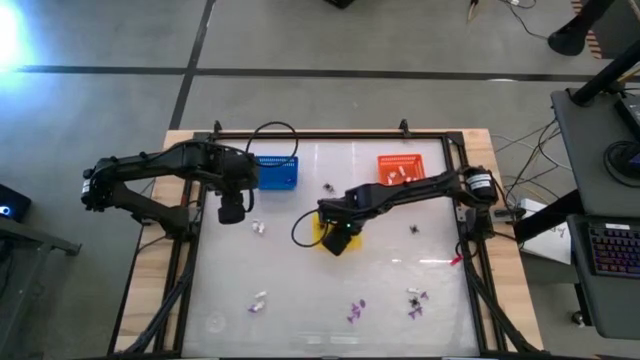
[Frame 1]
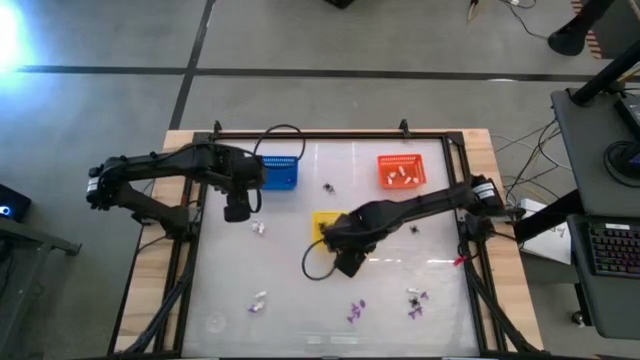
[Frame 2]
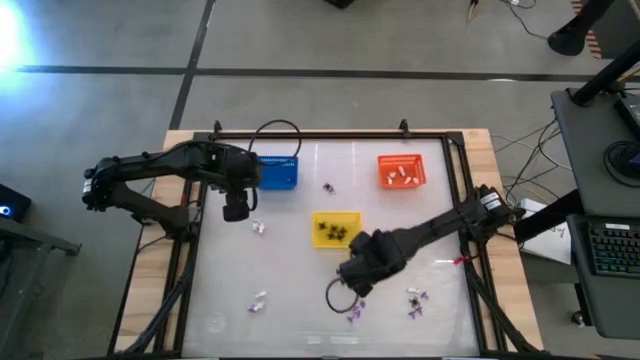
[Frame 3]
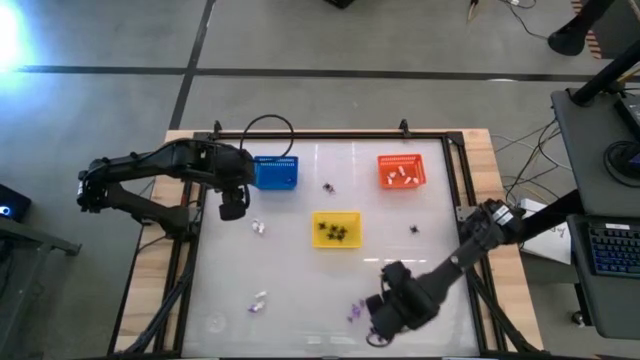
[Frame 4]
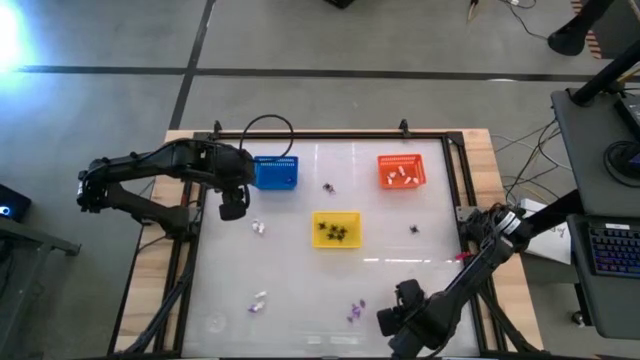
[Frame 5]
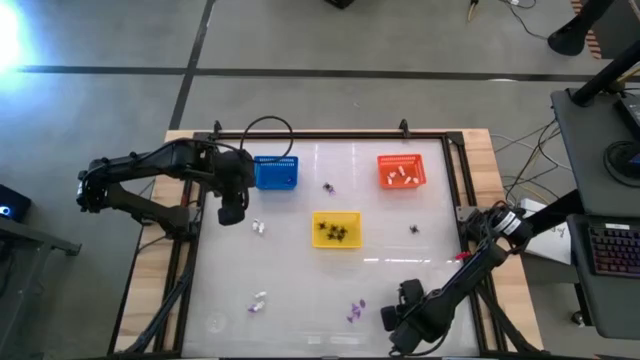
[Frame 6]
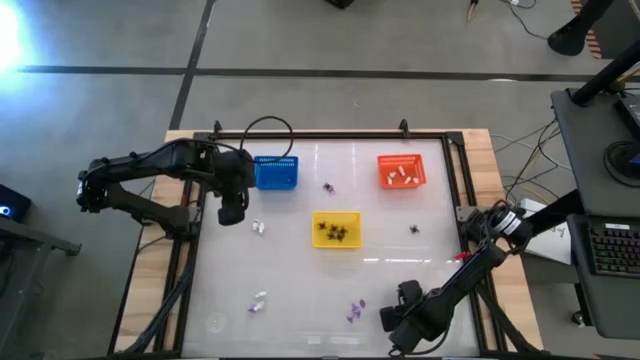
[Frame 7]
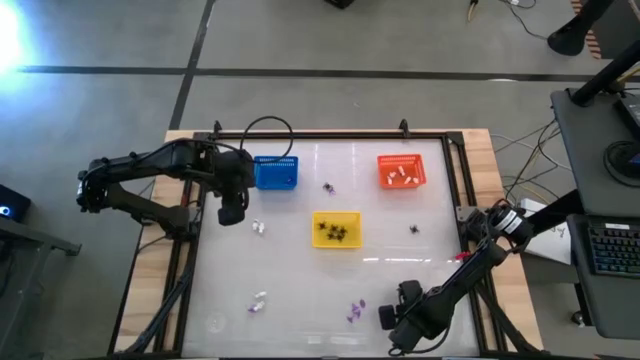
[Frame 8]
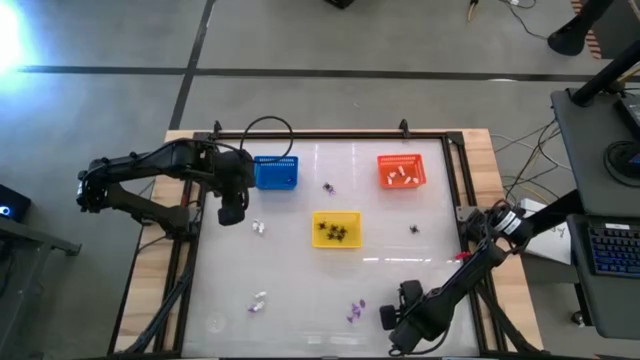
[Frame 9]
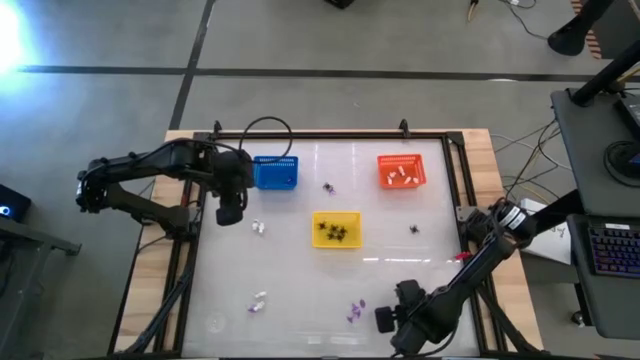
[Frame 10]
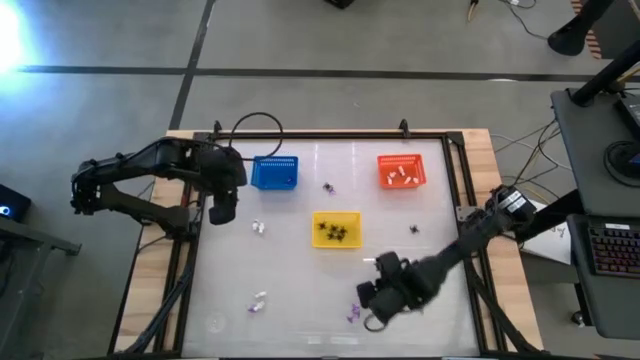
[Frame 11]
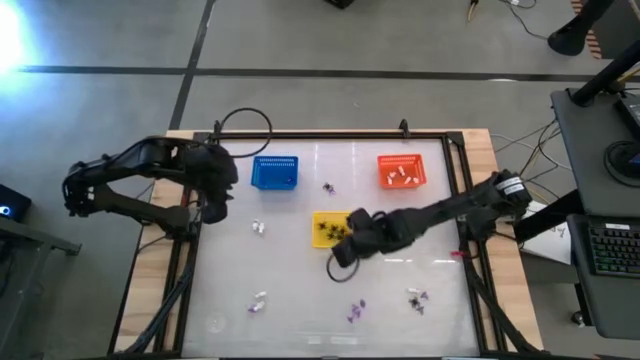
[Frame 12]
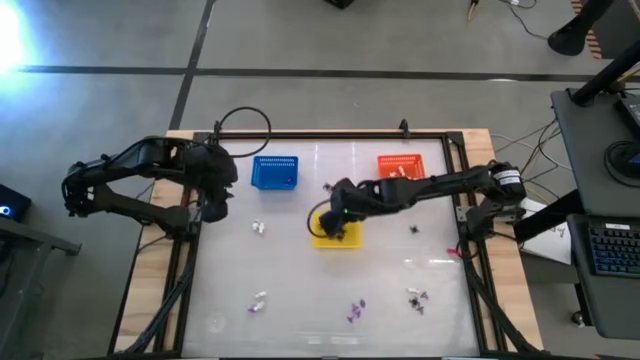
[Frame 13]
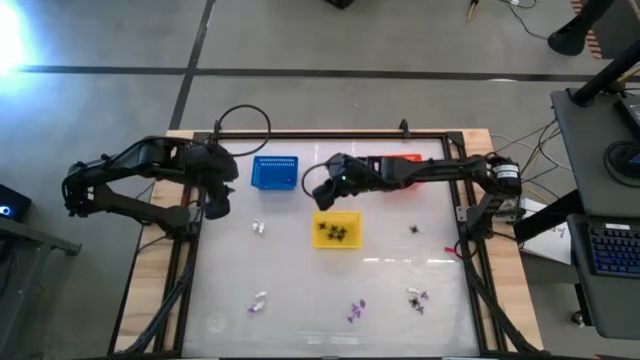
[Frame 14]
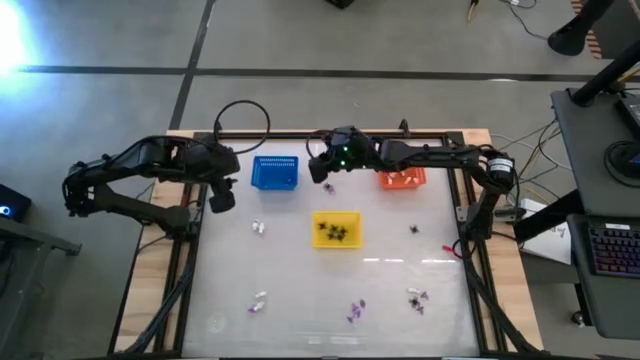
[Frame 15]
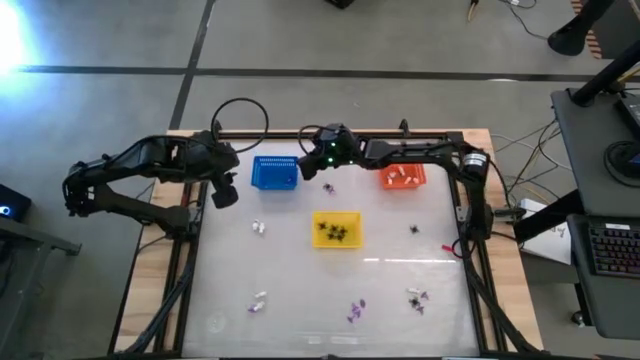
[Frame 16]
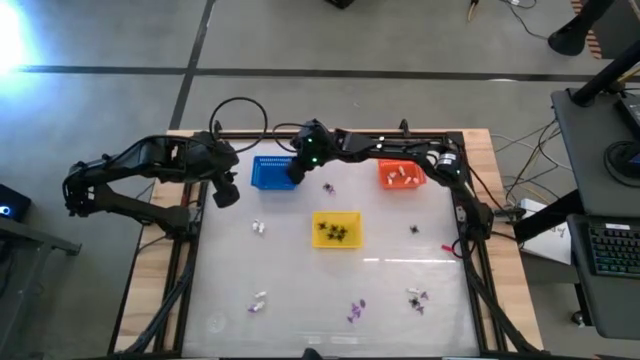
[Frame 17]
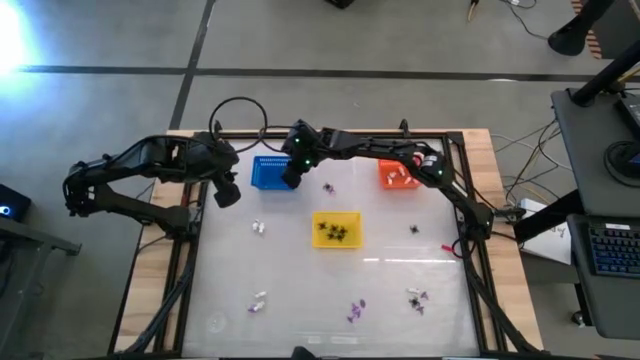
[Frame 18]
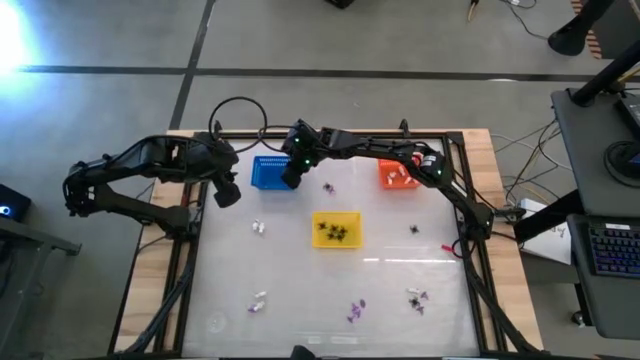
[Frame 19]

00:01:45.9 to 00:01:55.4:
Task: Sort Halloween decoration
Put the purple witch hat toy into the blue bin

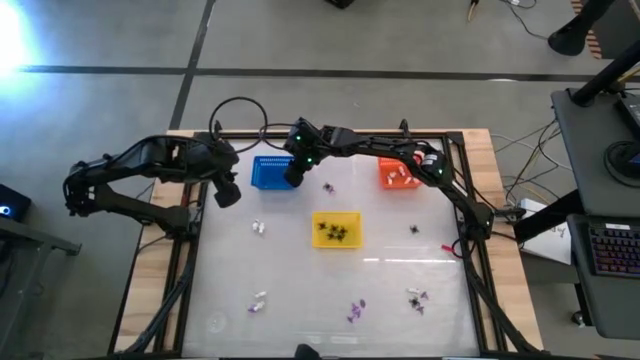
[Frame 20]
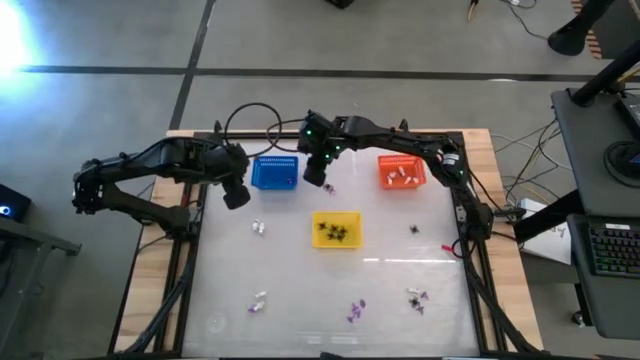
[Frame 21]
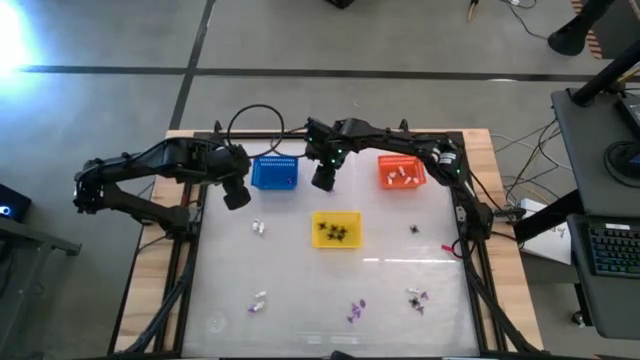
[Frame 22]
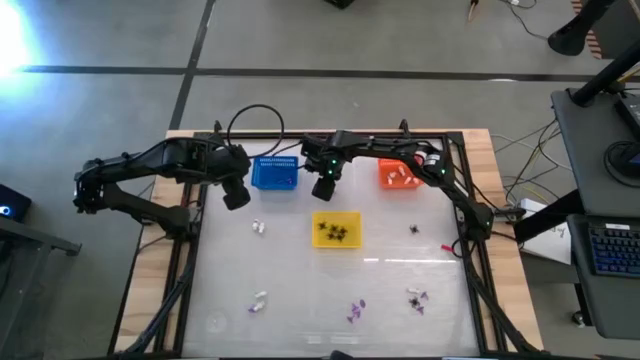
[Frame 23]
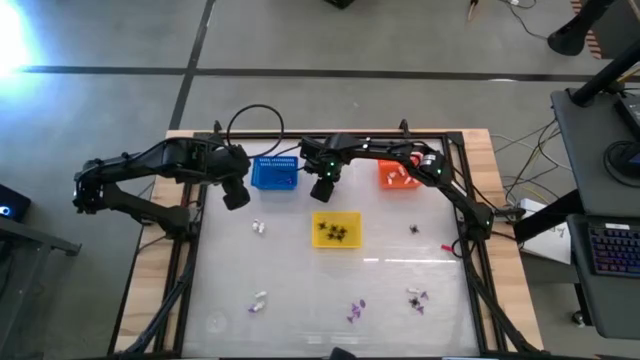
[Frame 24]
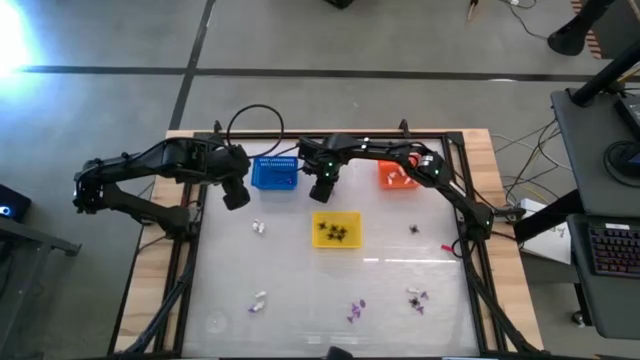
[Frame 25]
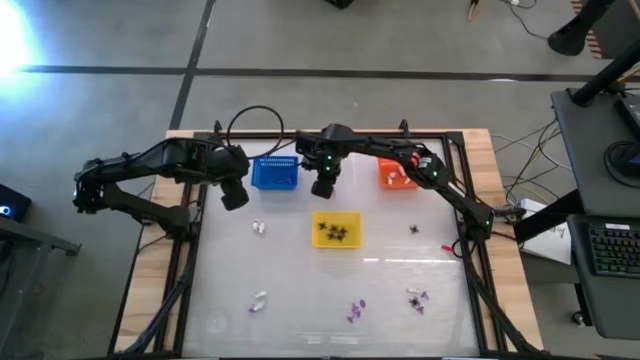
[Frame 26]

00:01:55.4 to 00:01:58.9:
Put the black spider toy into the yellow bin

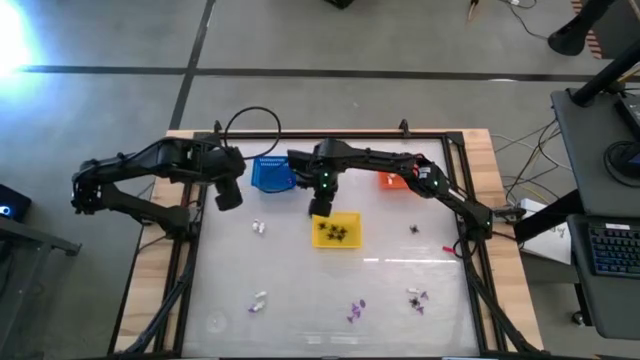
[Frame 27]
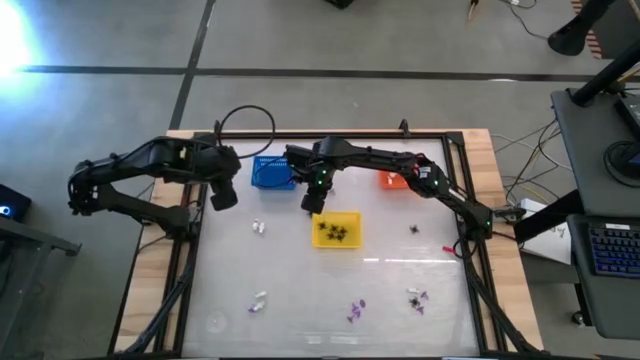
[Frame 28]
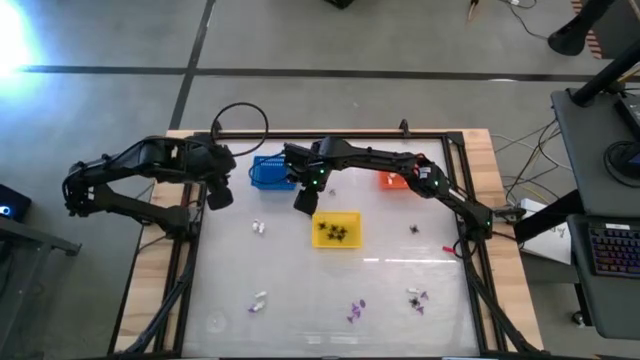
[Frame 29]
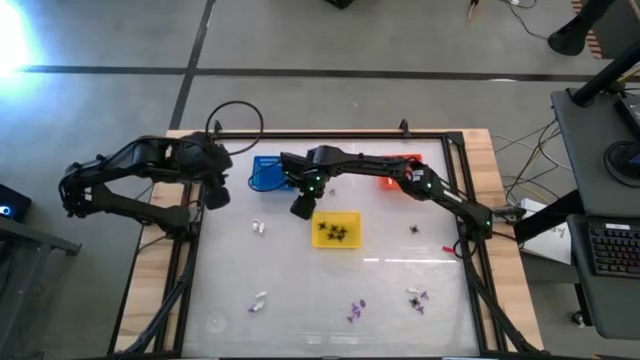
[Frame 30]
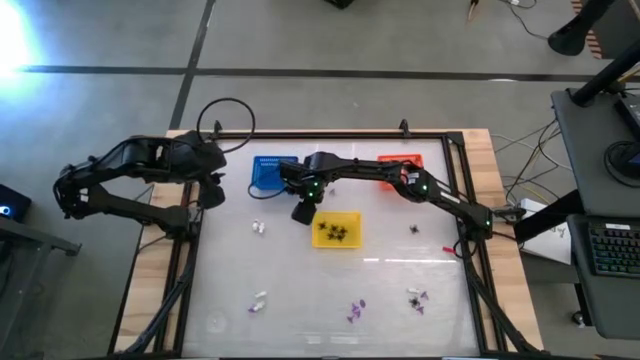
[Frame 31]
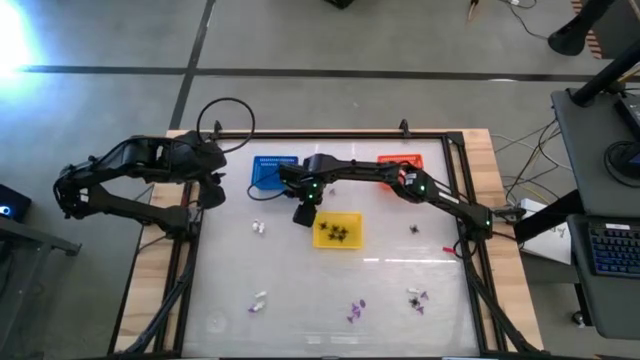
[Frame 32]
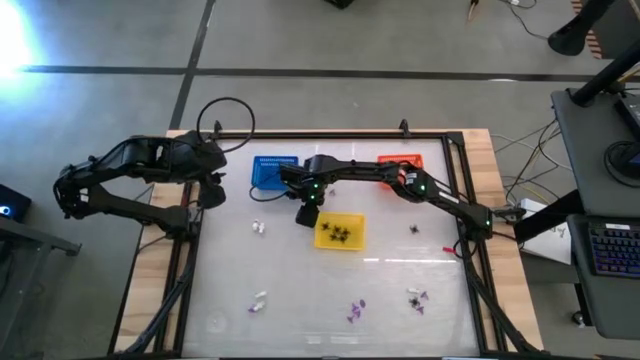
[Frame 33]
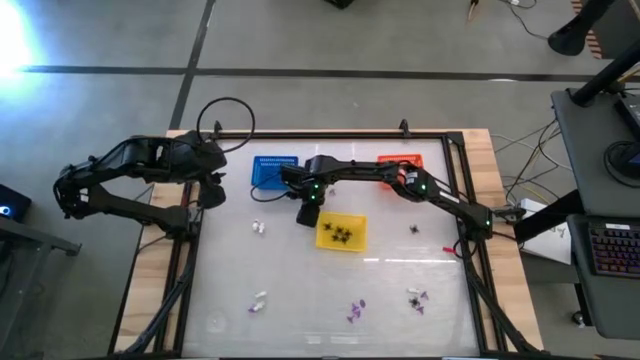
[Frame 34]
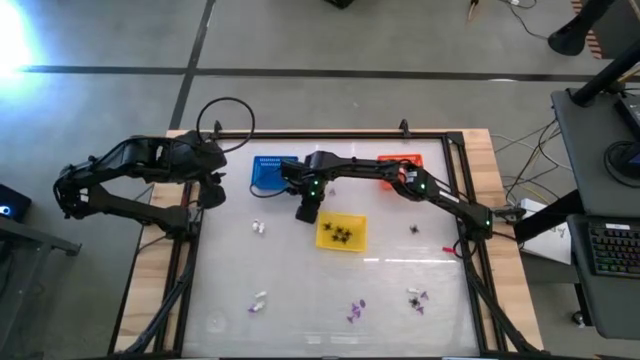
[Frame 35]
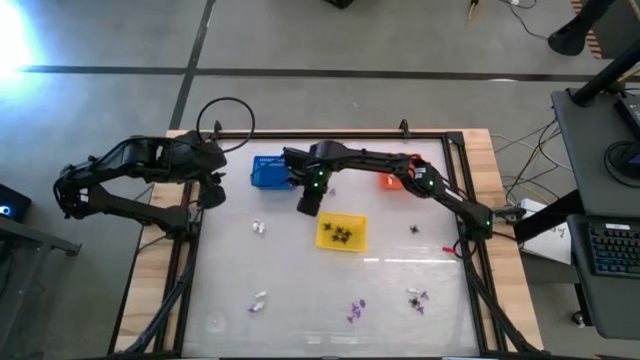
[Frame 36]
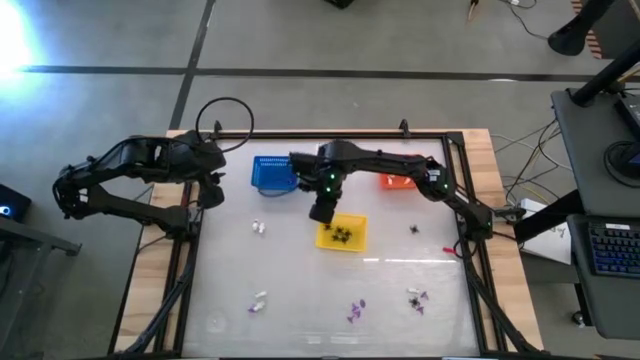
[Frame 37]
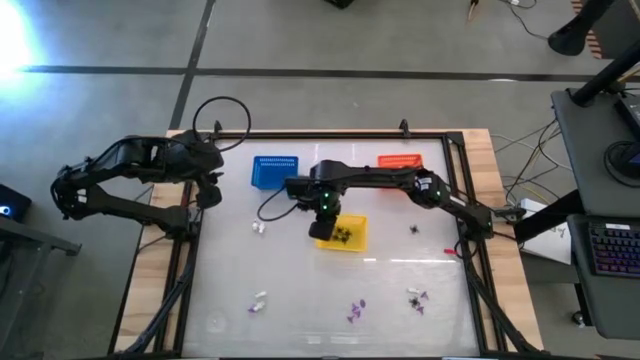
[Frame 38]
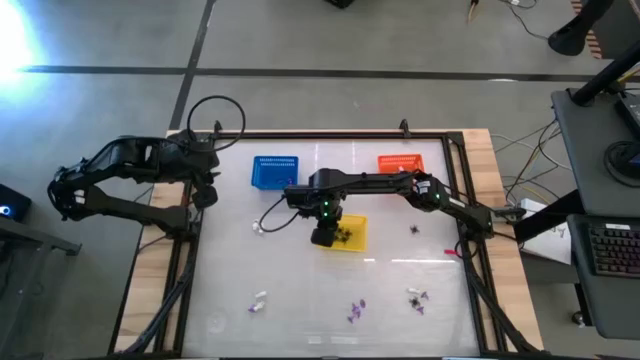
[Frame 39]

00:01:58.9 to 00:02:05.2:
Put the black spider toy into the yellow bin

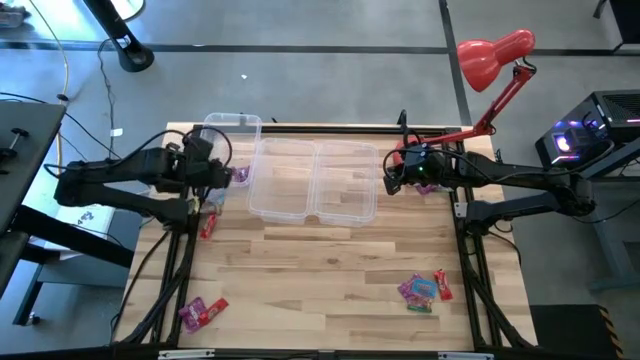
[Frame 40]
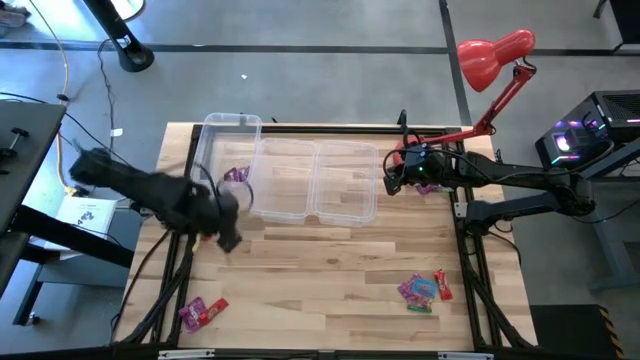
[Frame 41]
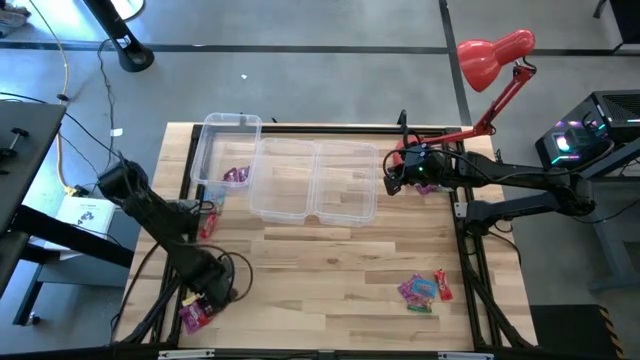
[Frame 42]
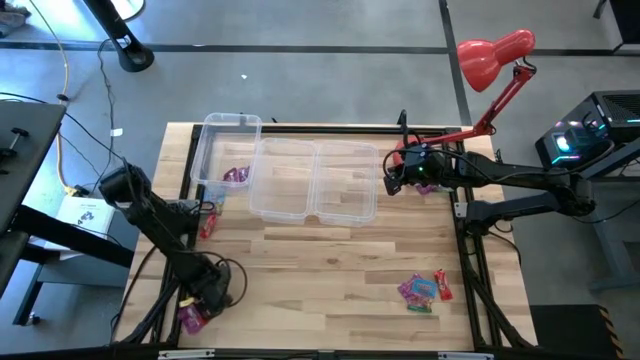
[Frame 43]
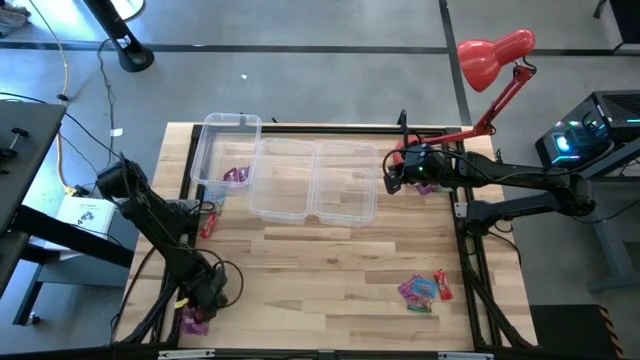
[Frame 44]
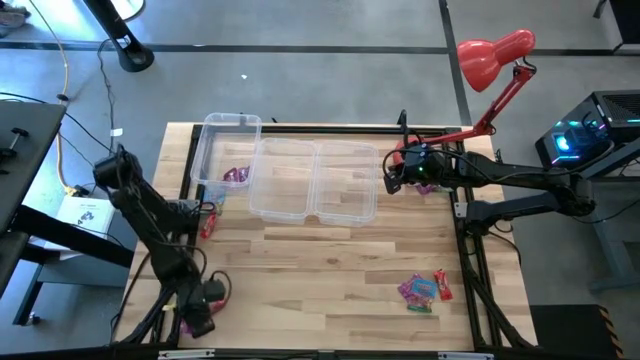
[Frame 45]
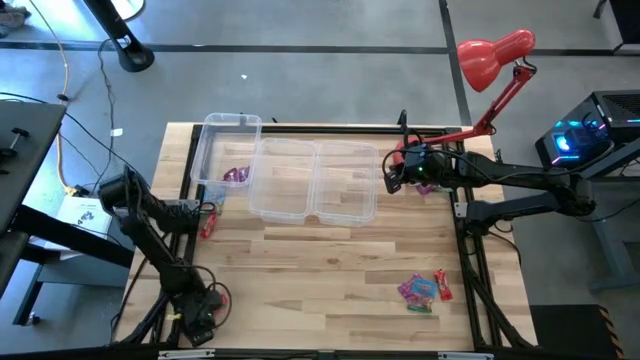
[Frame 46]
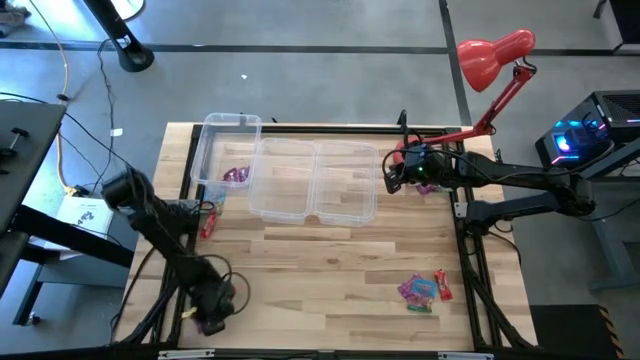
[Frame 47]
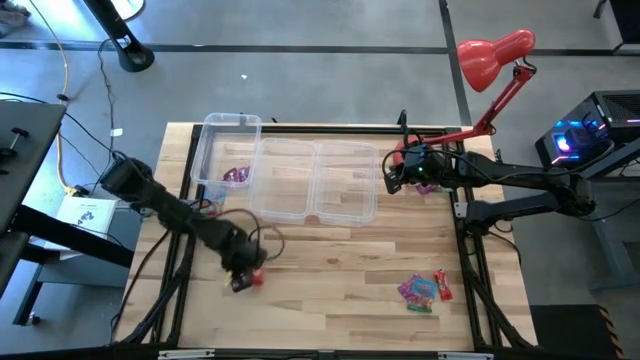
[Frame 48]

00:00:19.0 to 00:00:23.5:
Task: Sort candy
Put the violet candy bag into the left transparent bin
